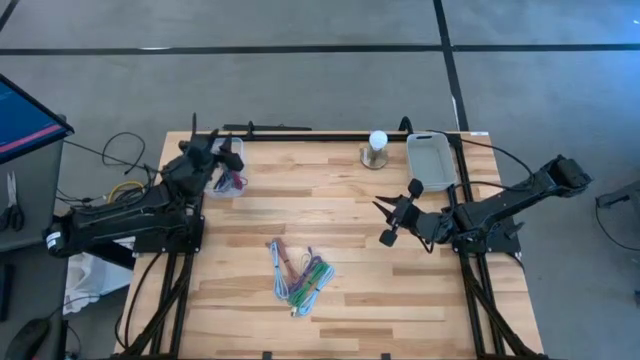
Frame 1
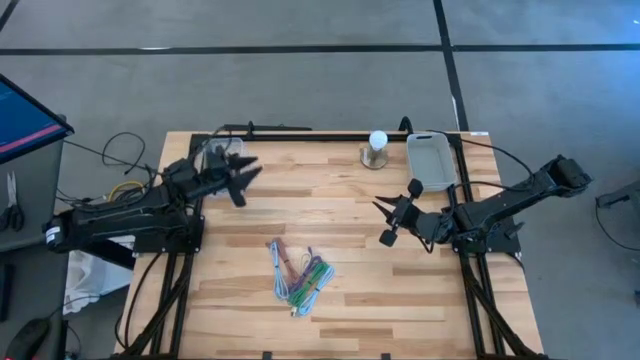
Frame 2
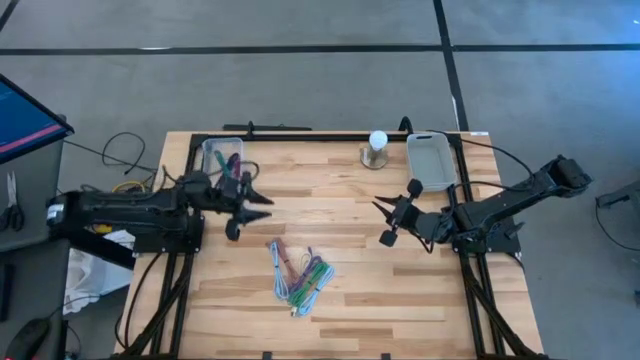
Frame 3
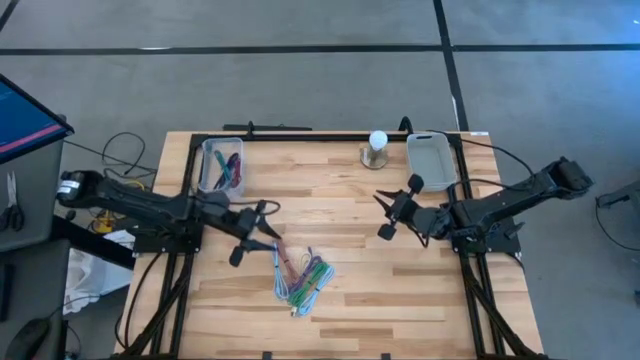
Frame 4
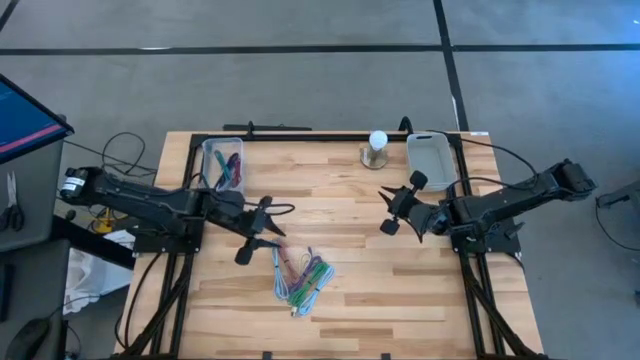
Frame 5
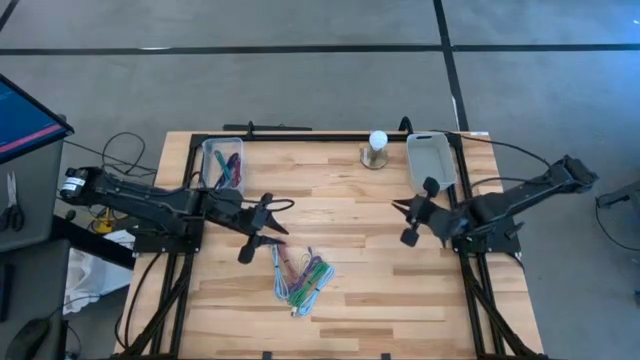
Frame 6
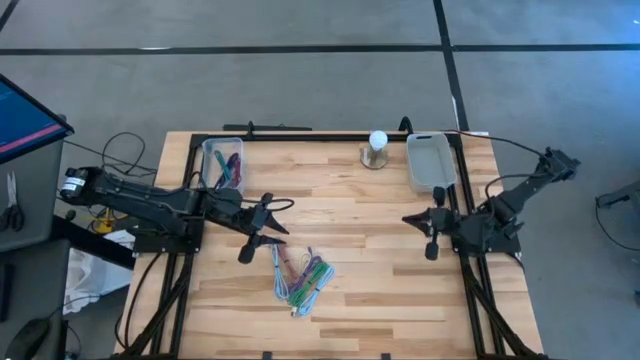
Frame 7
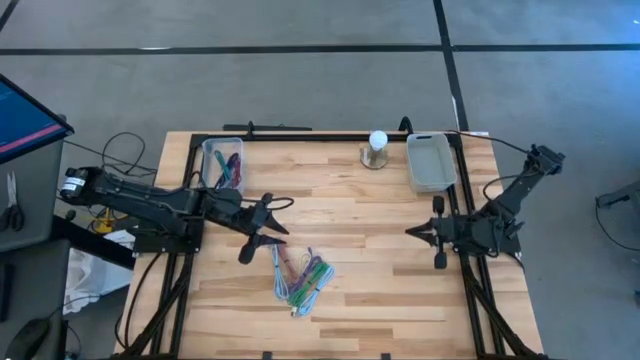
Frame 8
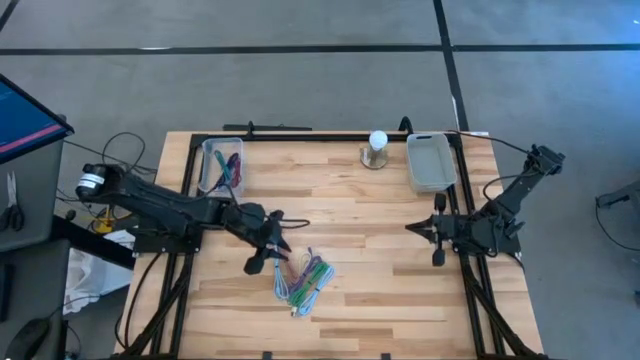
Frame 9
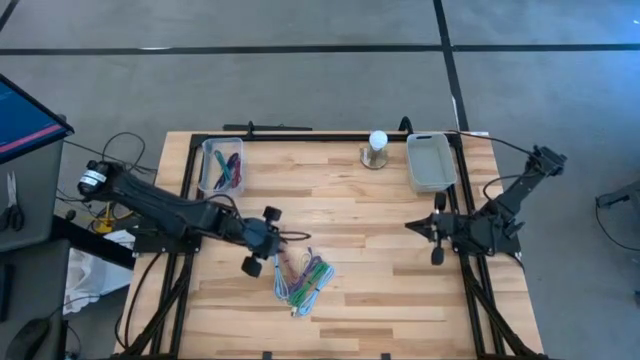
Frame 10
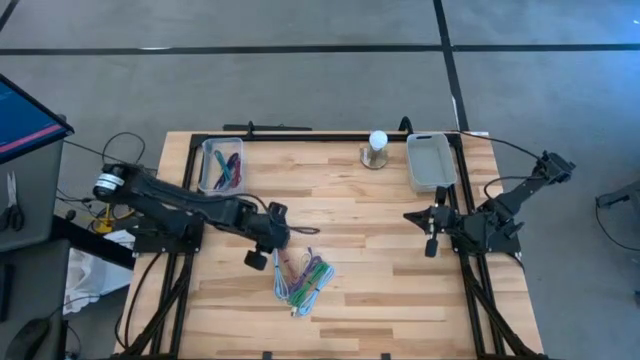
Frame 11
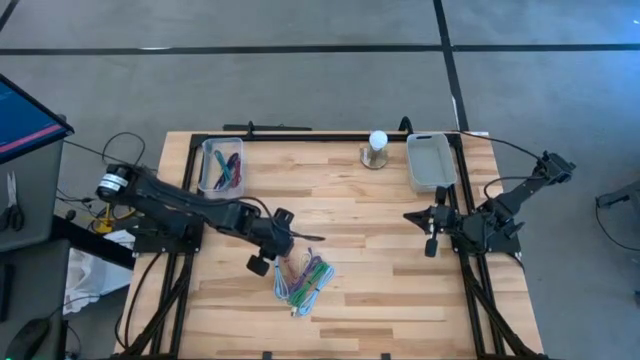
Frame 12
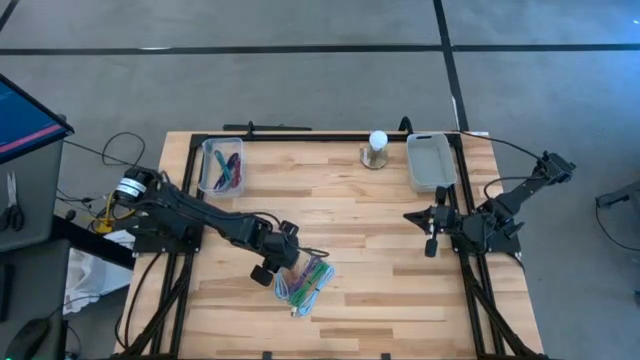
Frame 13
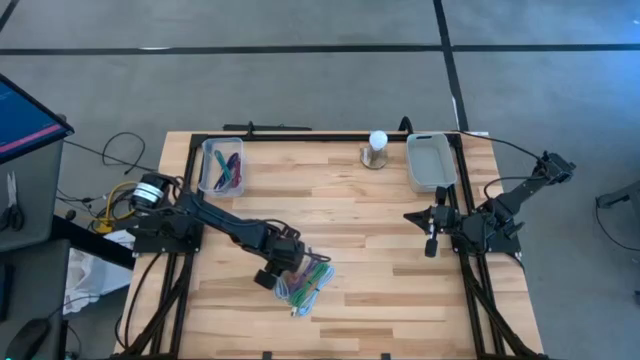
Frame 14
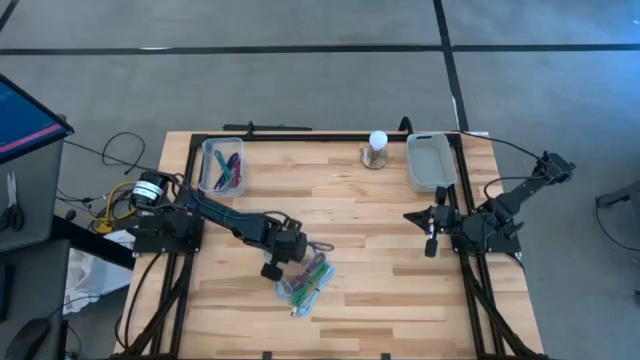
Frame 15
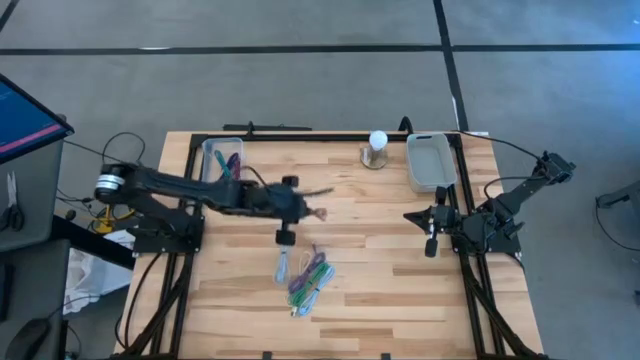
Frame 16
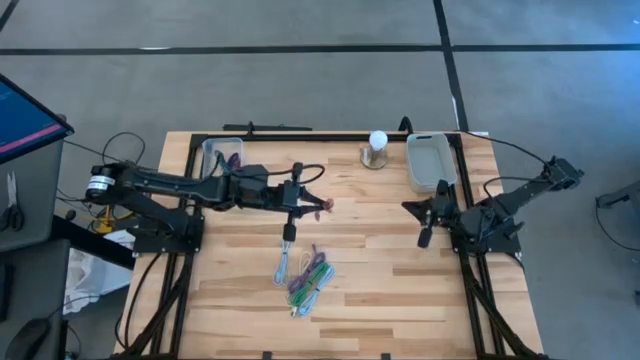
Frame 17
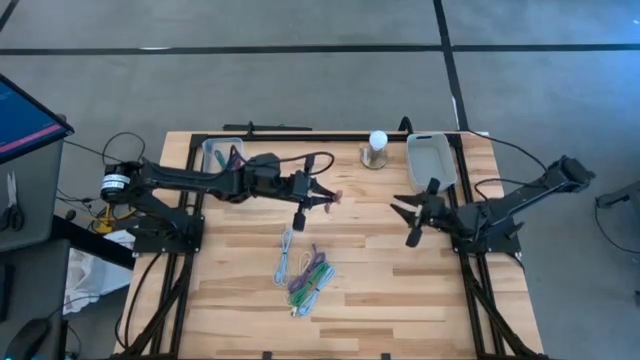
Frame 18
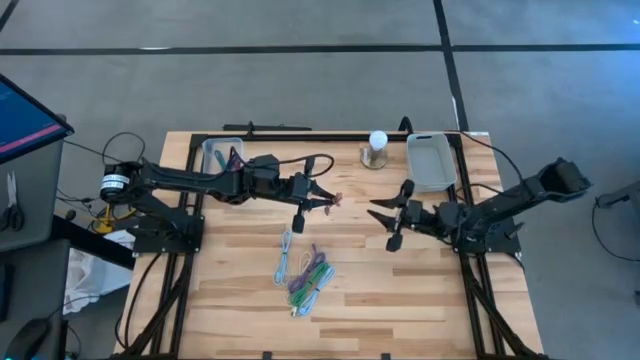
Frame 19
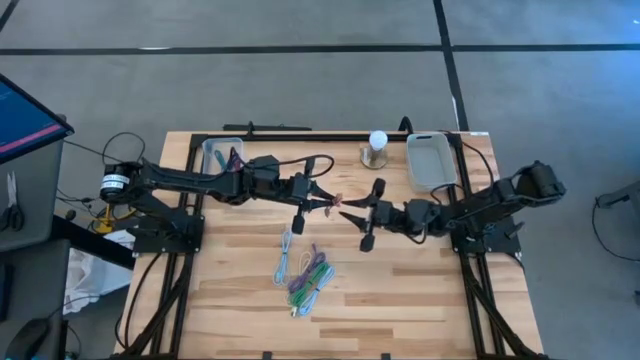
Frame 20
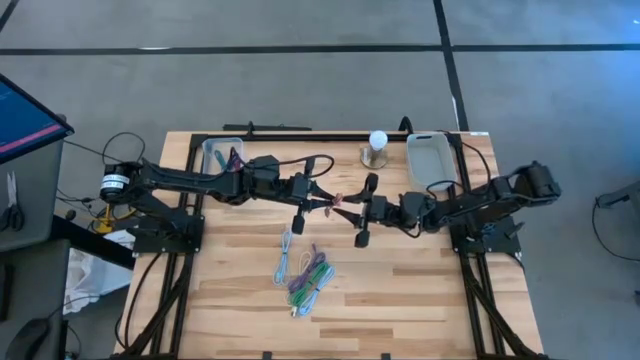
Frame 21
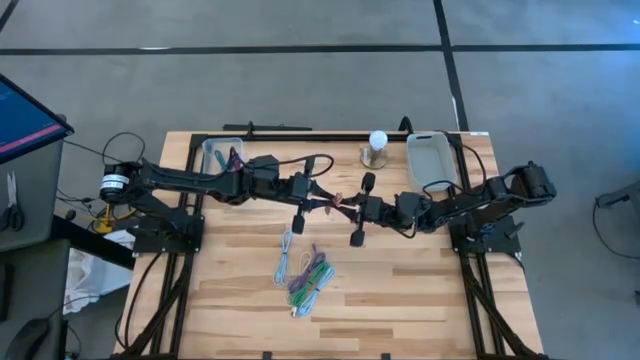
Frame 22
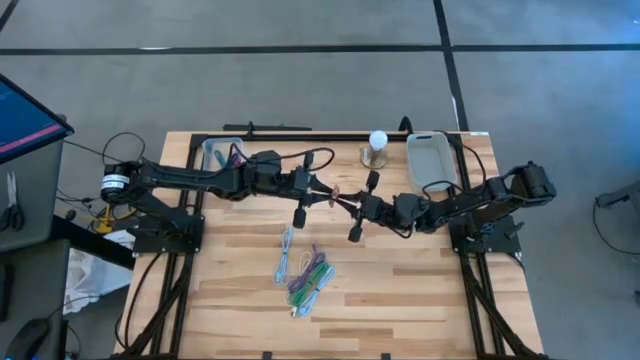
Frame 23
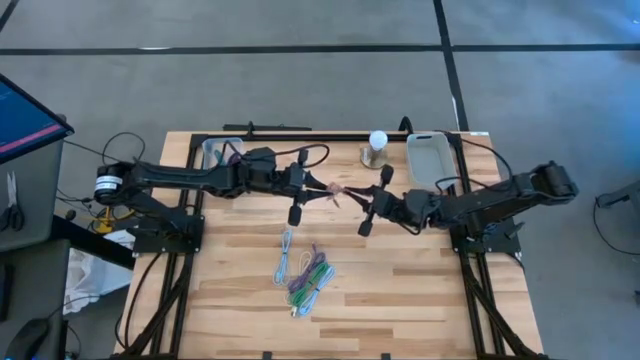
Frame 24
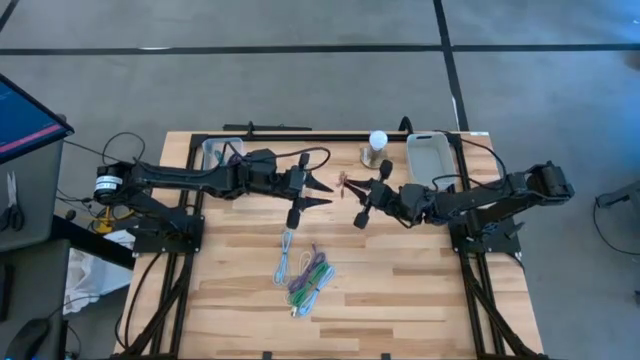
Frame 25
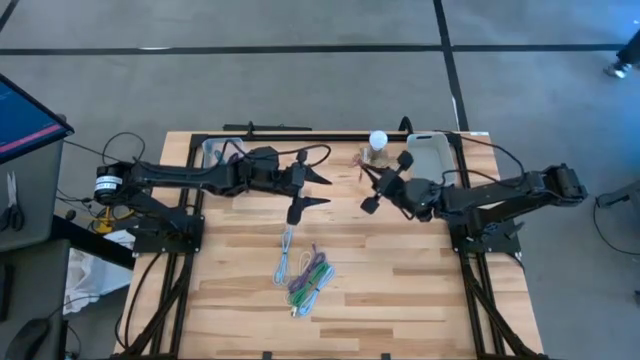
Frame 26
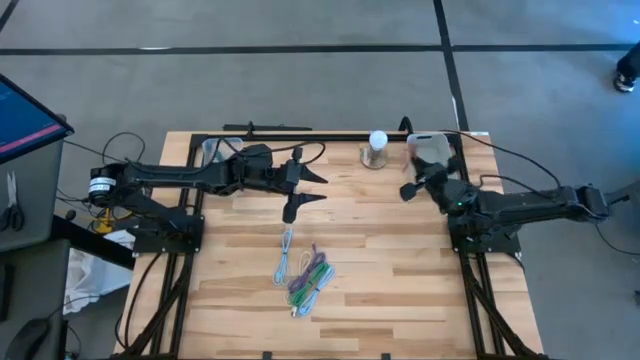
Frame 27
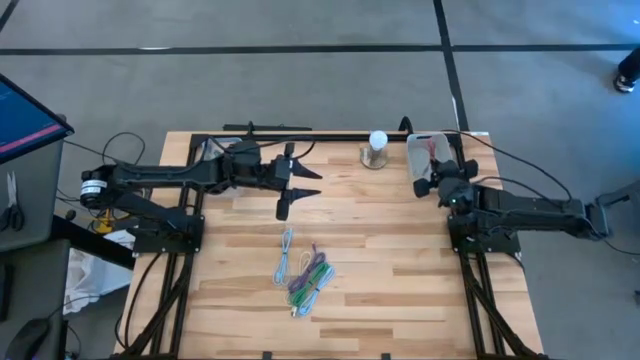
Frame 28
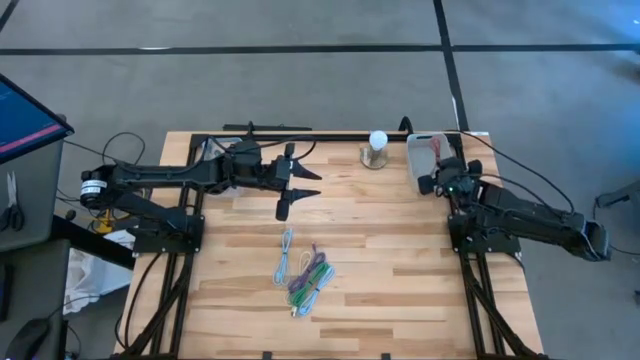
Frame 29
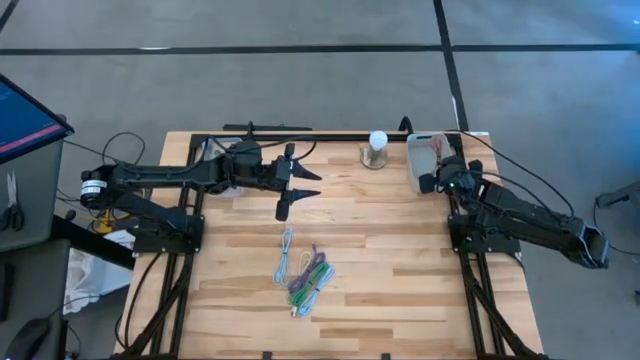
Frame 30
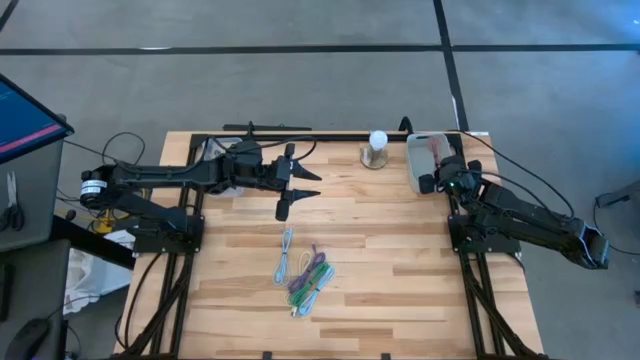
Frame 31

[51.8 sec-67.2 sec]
Task: Pick & Place USB Port
Put the pink charger cable into the gray bin

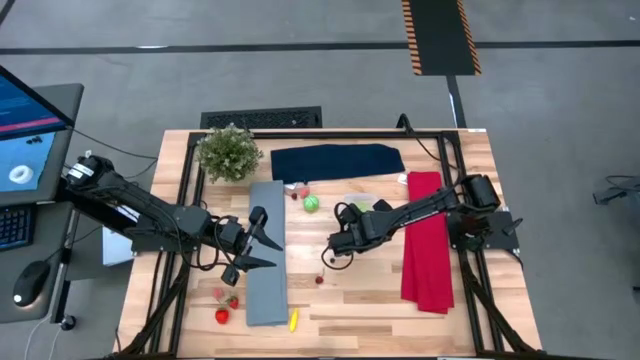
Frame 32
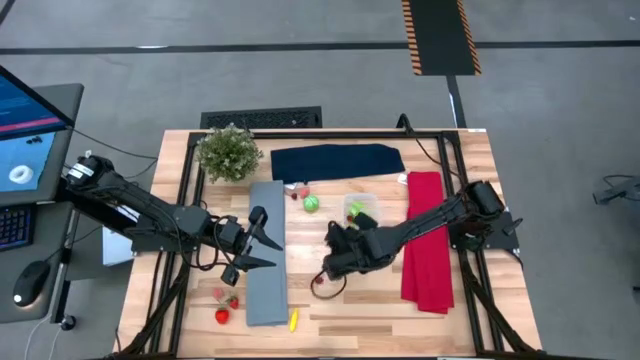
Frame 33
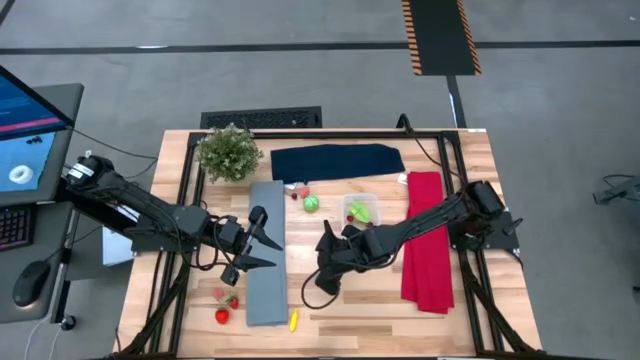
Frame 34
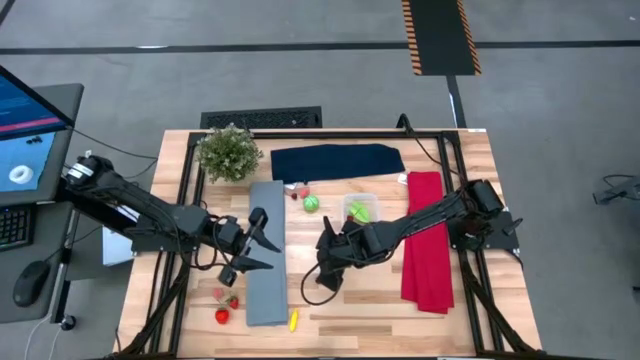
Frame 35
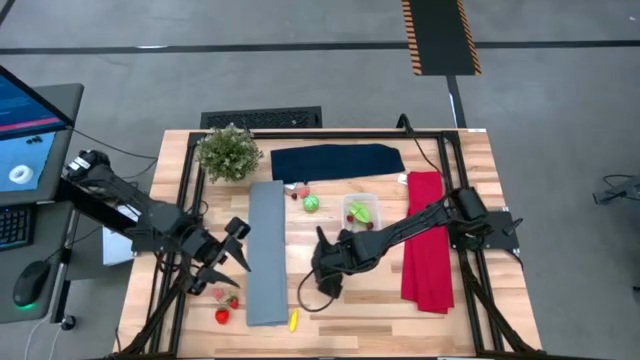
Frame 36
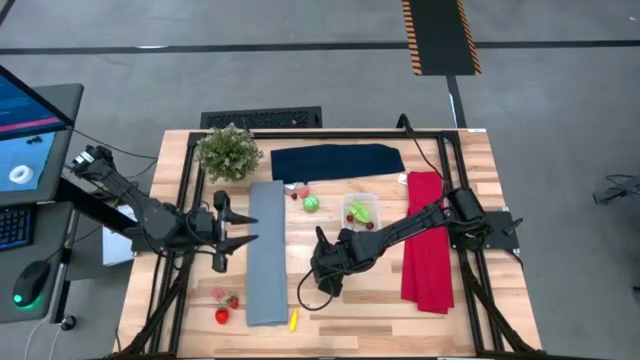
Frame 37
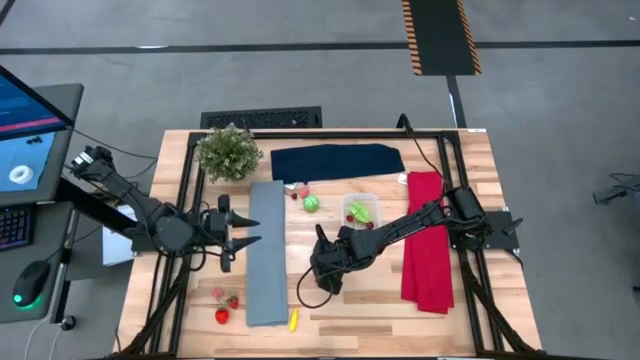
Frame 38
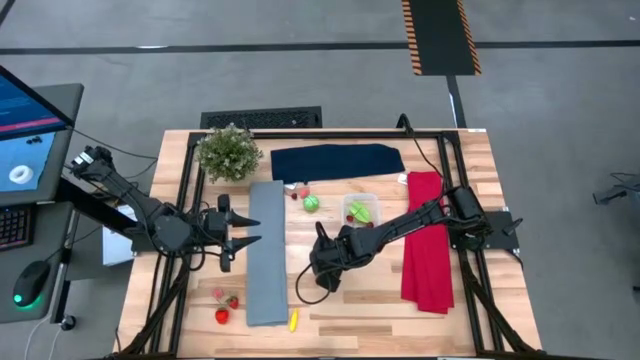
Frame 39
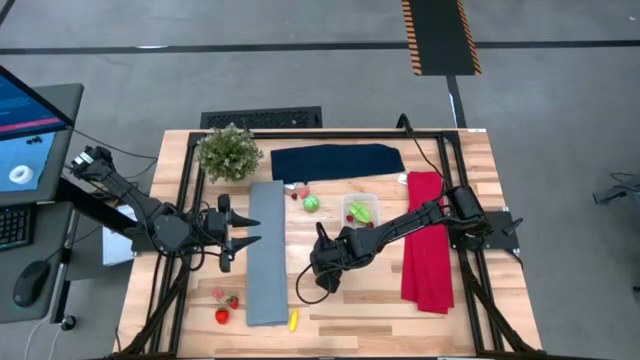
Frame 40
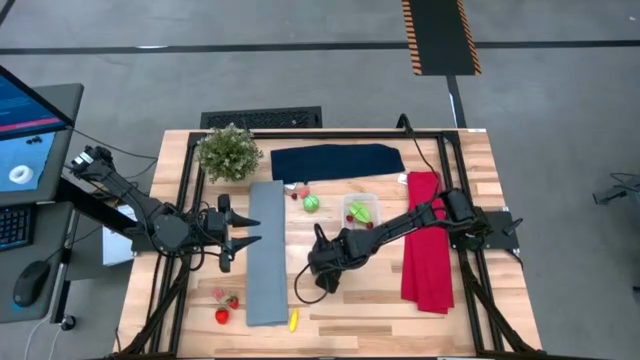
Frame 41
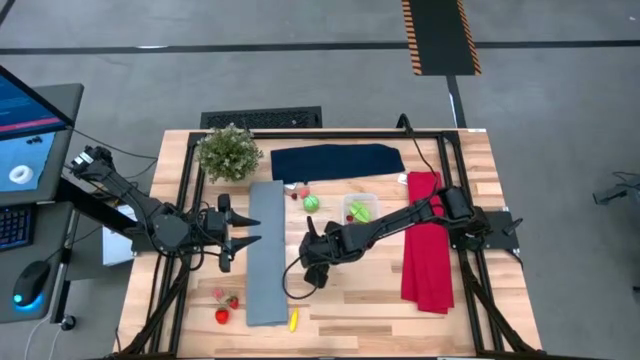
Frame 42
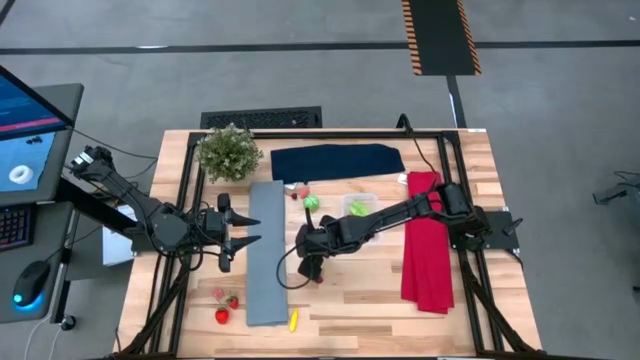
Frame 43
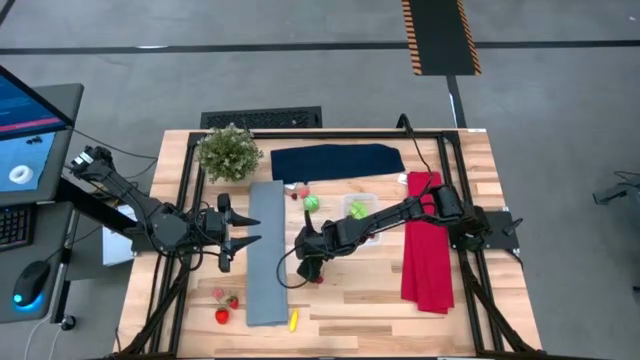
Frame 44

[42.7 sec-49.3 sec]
Task: Pick and placing Produce into tupperware
Put the blueberry into the transparent bin
